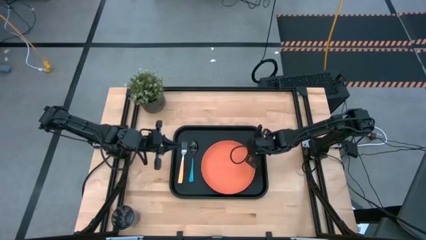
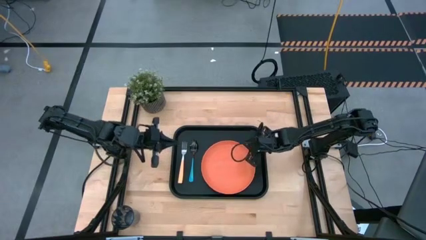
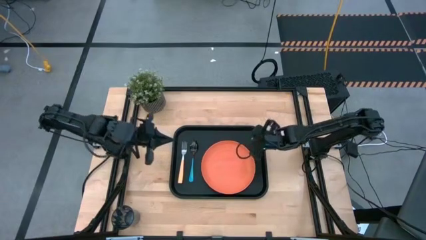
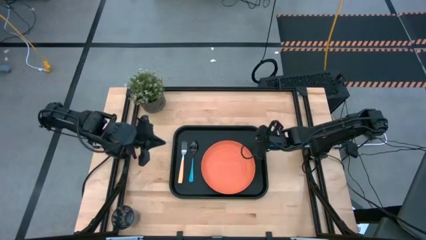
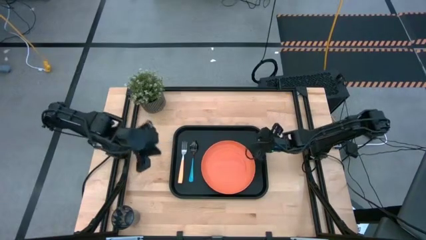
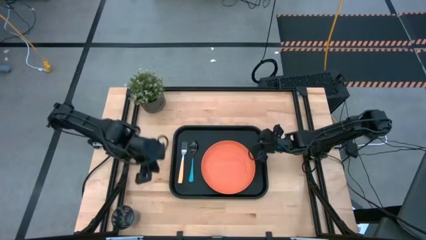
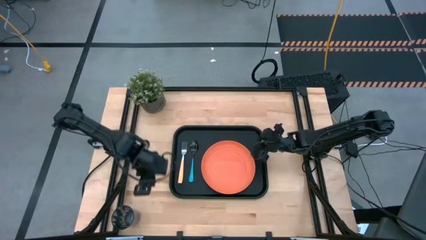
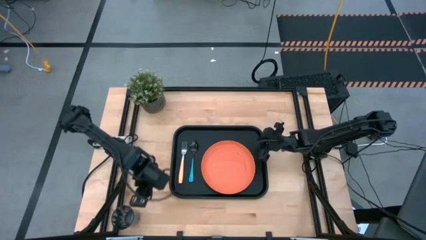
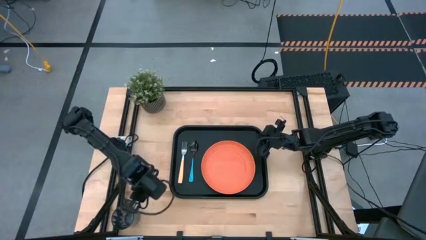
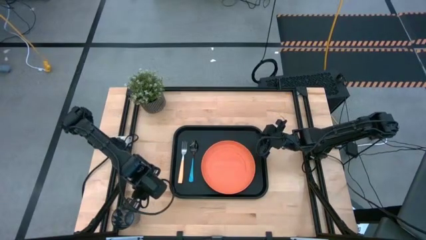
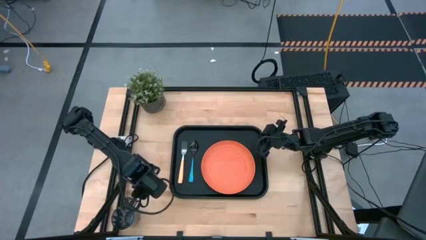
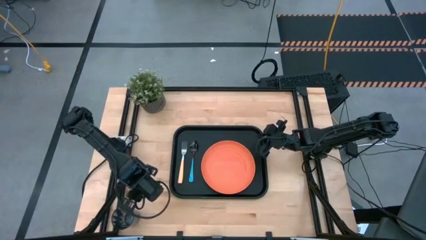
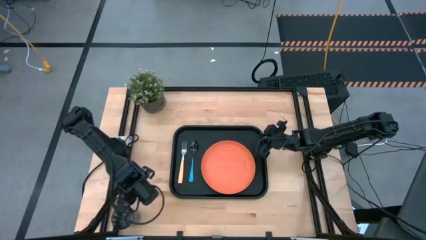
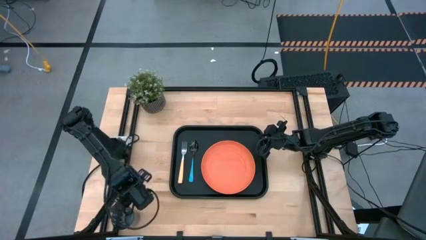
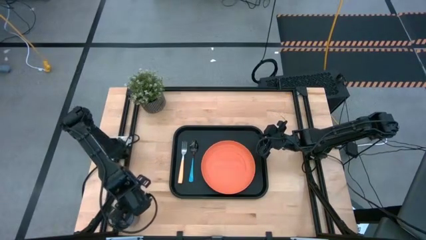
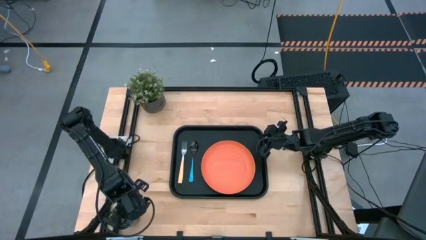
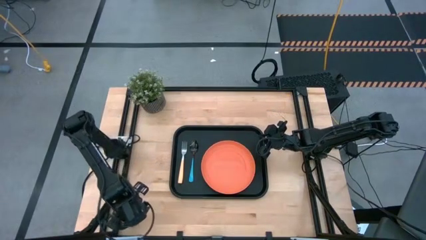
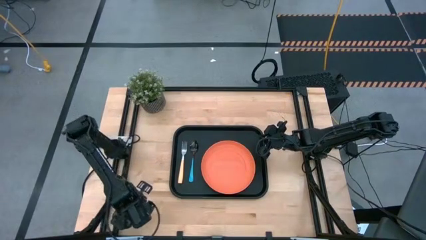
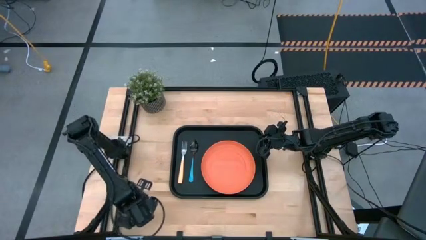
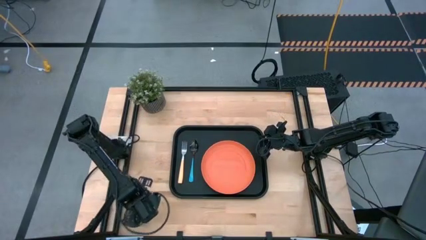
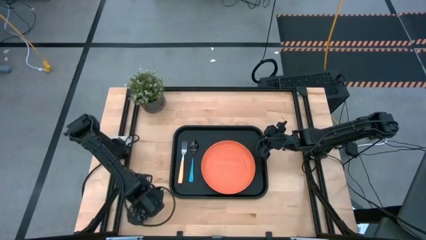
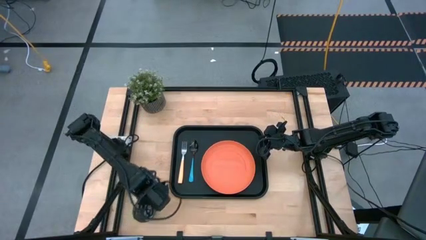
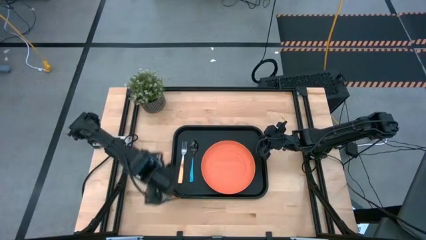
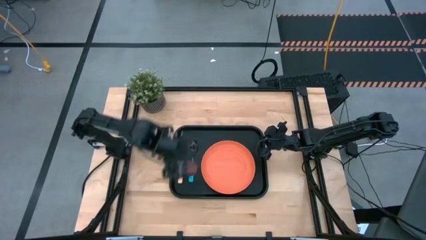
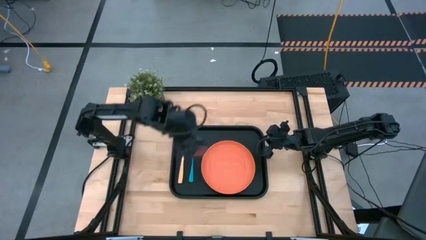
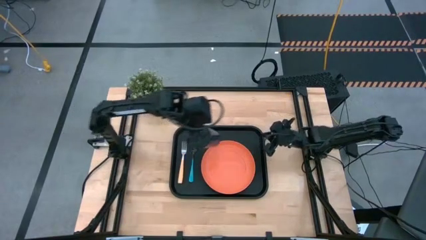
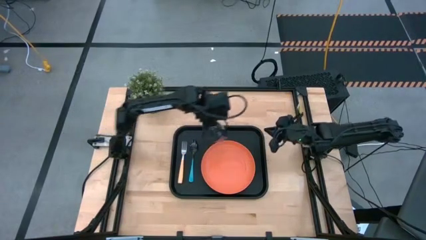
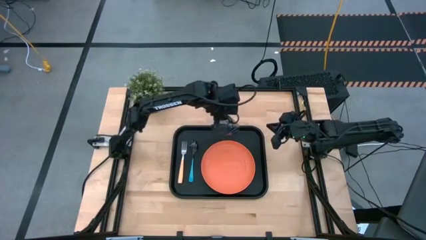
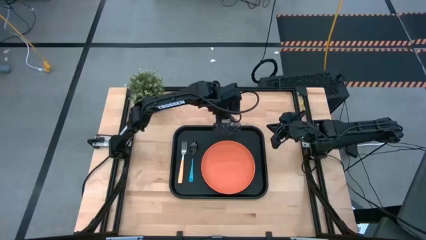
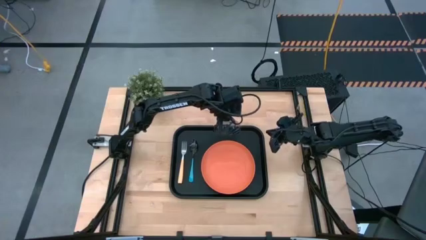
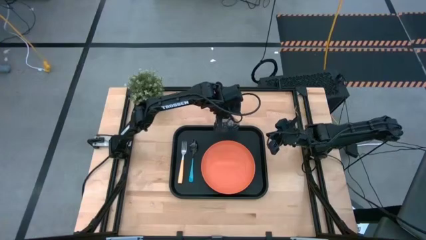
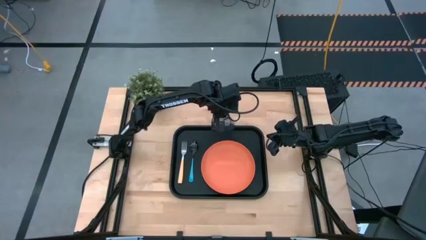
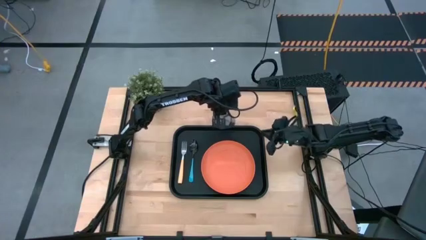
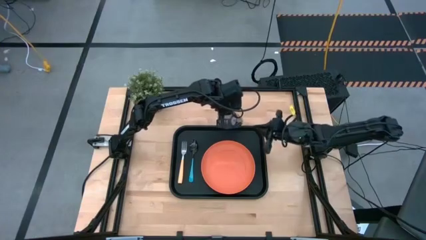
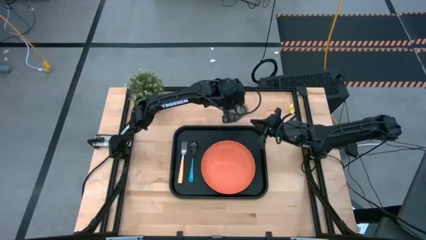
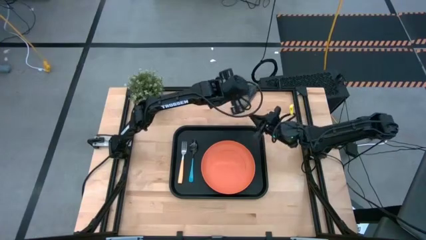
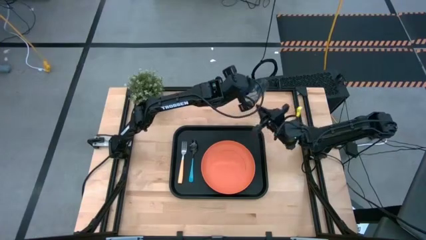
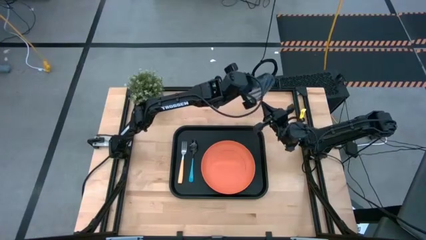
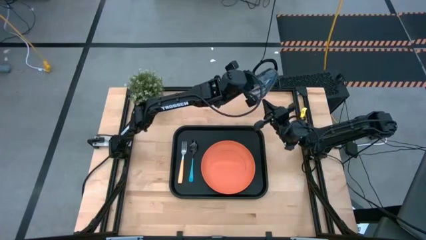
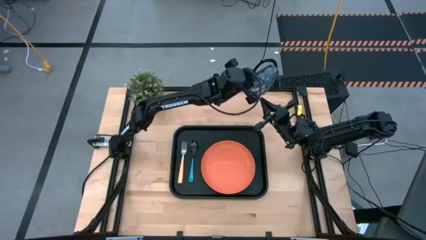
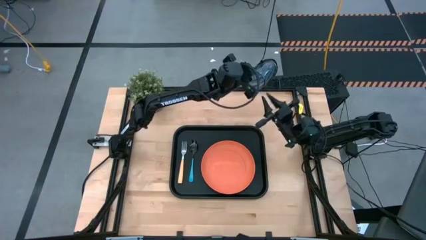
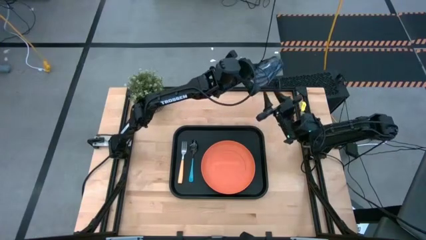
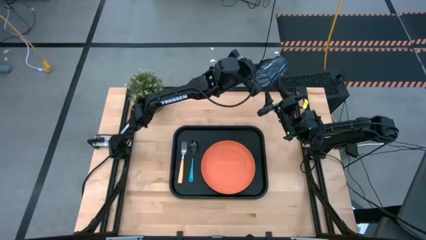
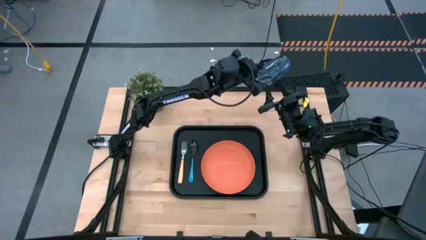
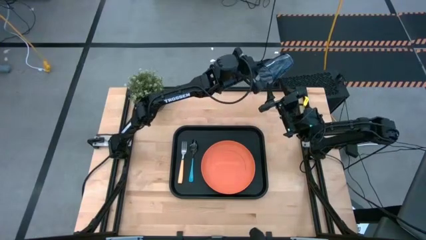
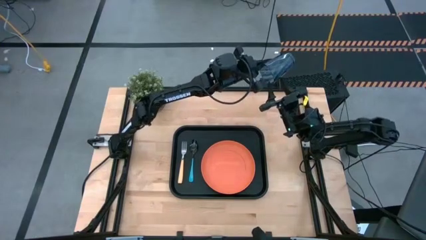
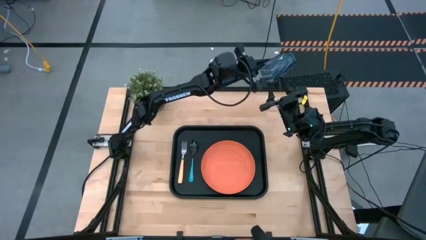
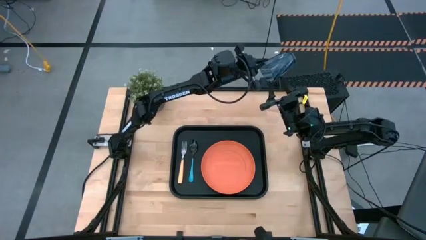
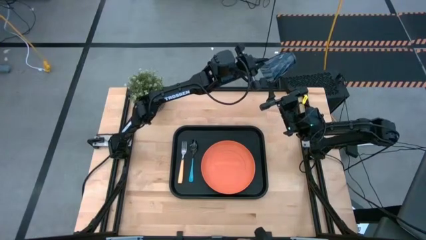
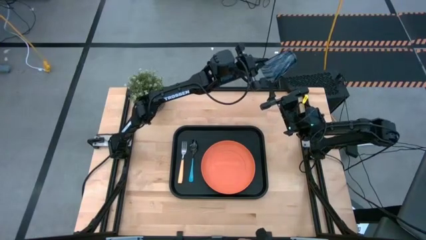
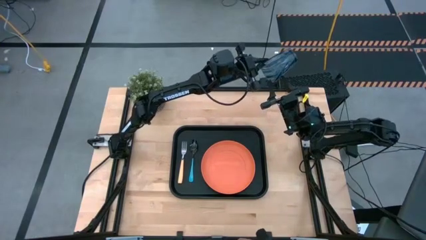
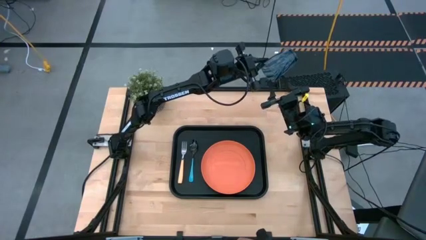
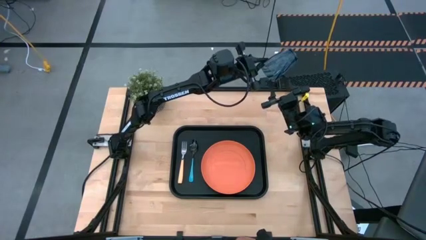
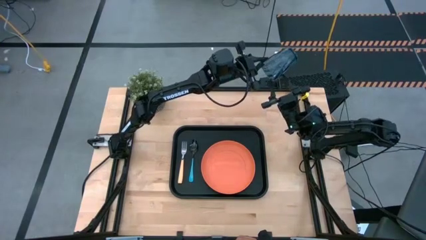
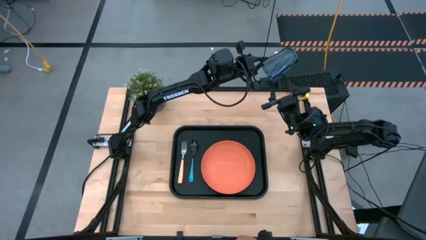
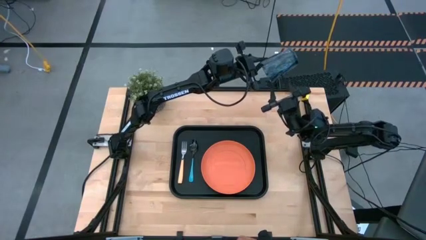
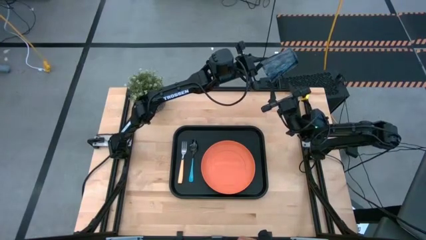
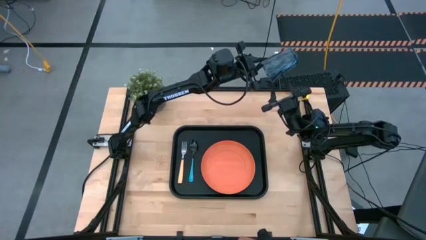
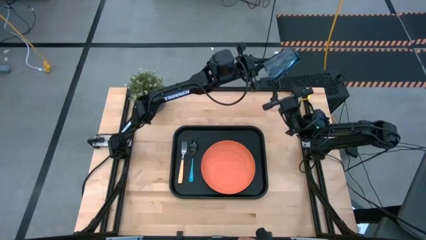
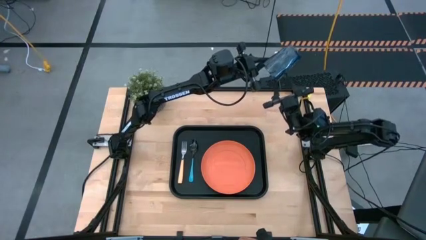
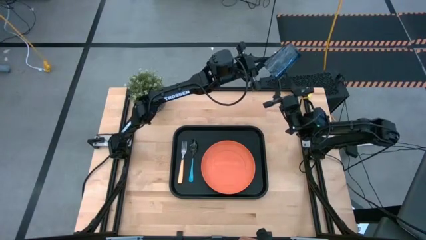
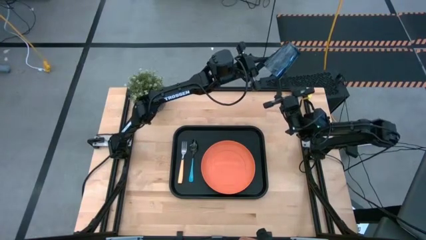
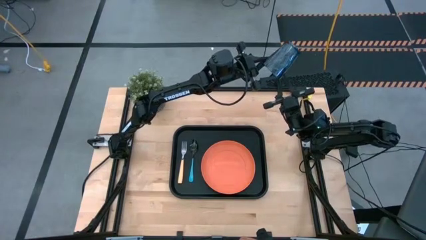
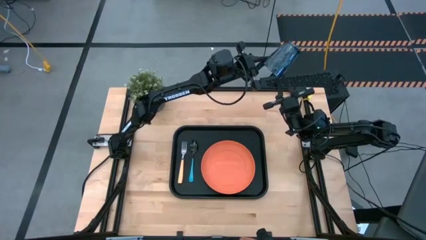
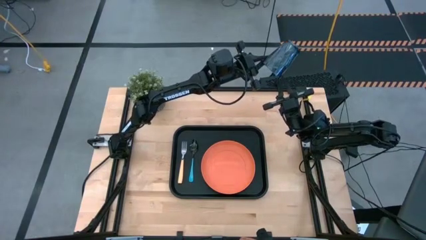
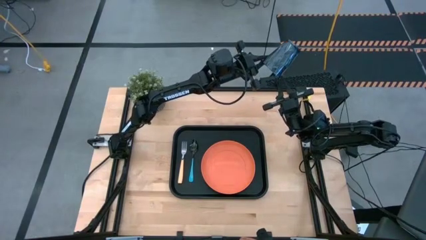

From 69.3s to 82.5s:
Task: Pick and place plate/cup/fork/spoon on tray
Put the blue cup to the top right of the orange plate on the black table tray
